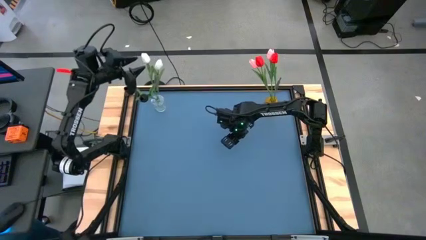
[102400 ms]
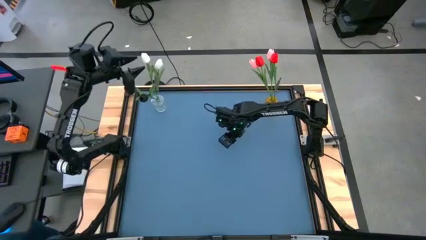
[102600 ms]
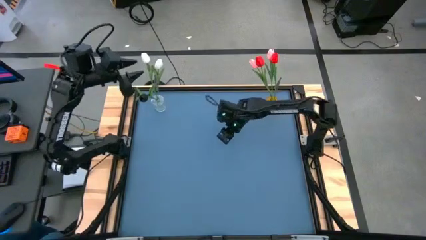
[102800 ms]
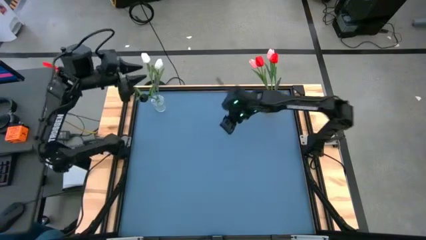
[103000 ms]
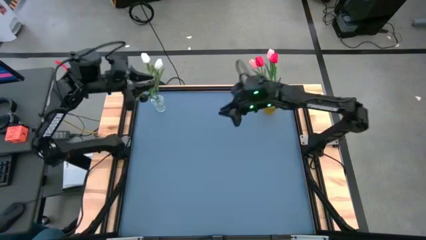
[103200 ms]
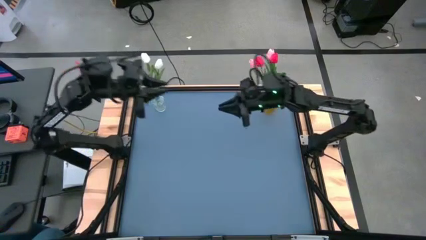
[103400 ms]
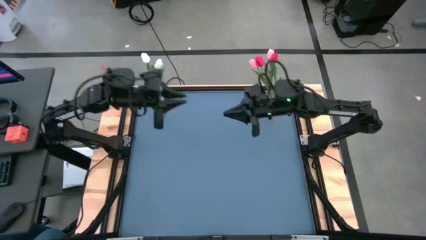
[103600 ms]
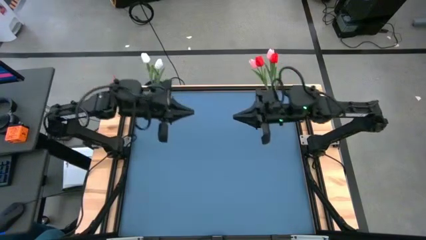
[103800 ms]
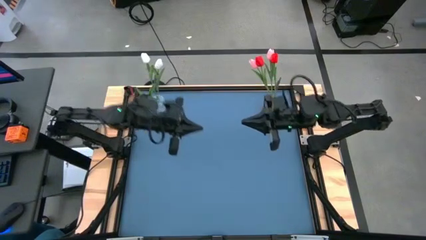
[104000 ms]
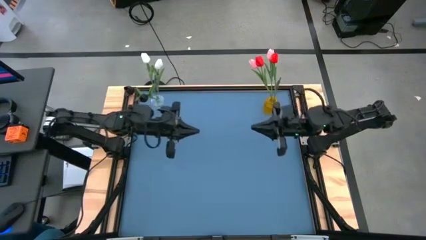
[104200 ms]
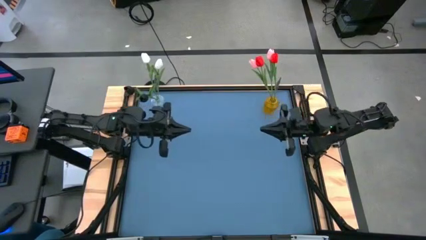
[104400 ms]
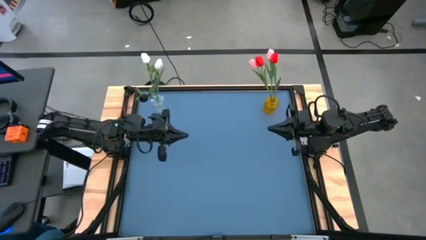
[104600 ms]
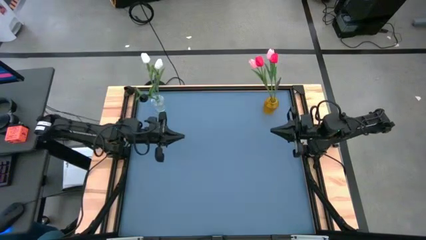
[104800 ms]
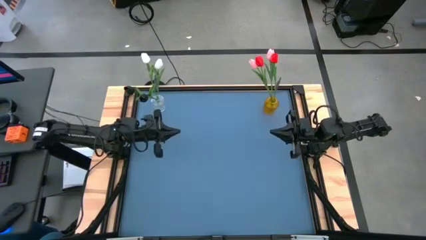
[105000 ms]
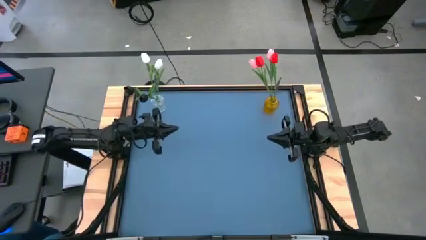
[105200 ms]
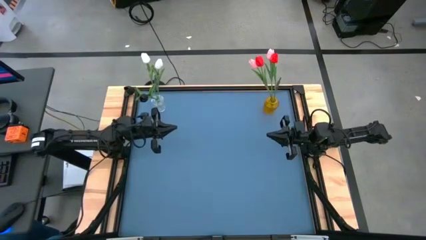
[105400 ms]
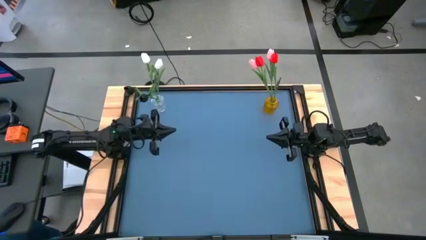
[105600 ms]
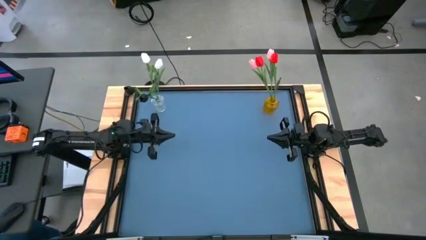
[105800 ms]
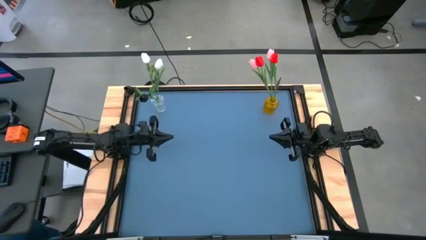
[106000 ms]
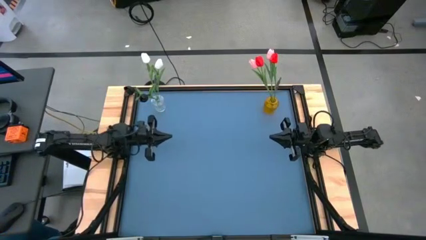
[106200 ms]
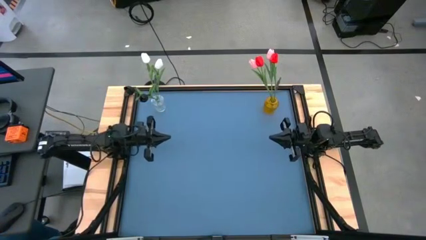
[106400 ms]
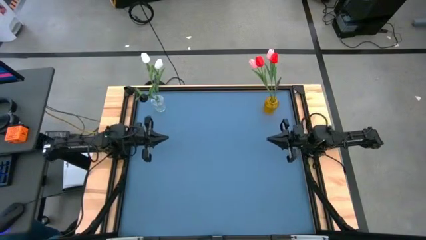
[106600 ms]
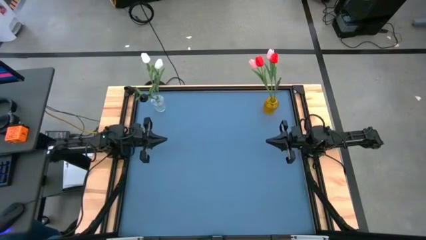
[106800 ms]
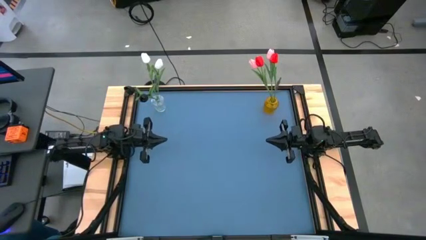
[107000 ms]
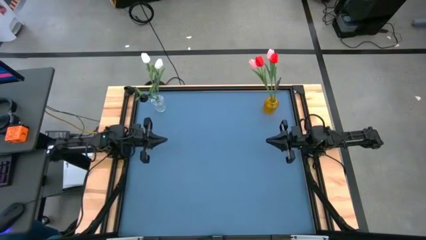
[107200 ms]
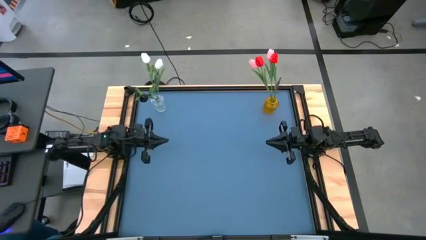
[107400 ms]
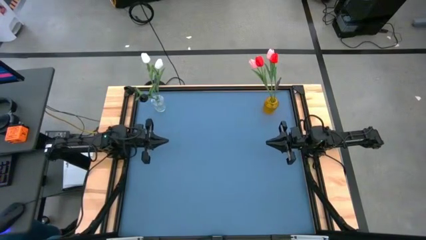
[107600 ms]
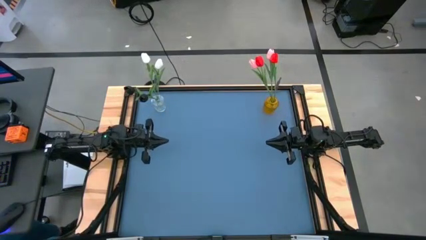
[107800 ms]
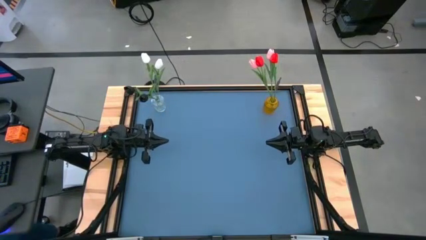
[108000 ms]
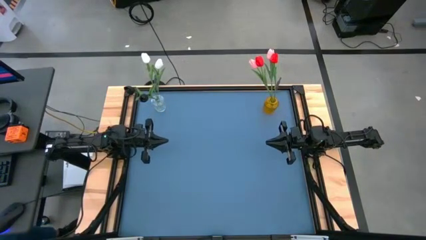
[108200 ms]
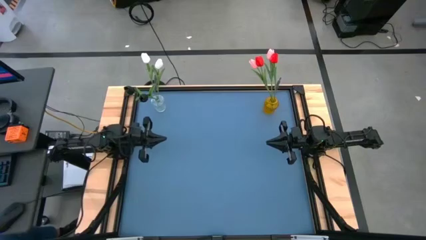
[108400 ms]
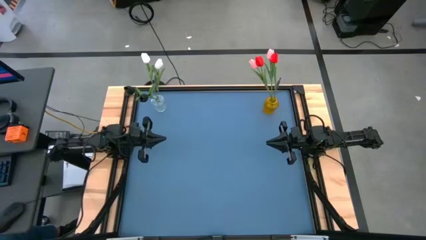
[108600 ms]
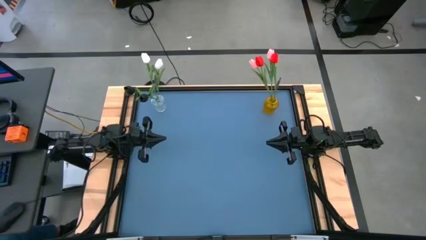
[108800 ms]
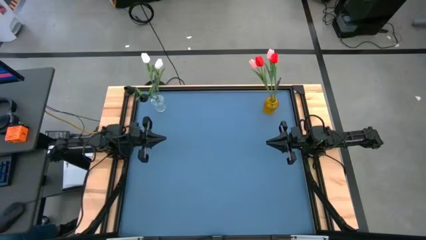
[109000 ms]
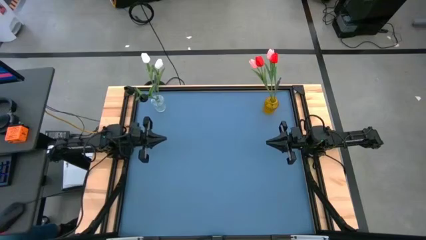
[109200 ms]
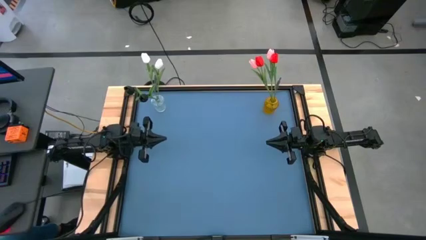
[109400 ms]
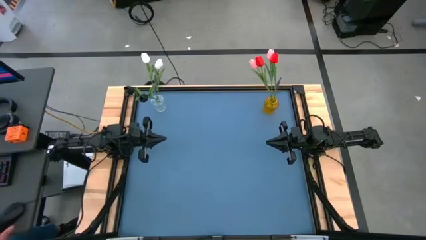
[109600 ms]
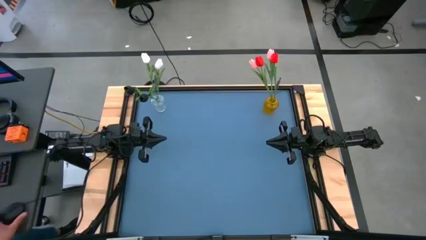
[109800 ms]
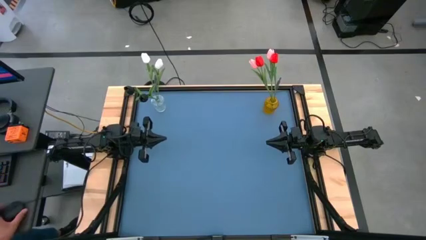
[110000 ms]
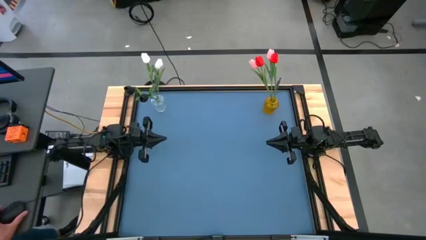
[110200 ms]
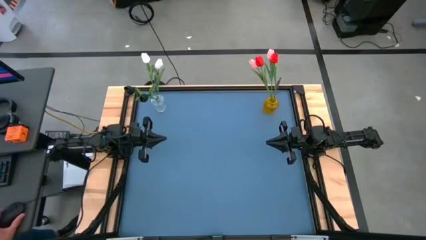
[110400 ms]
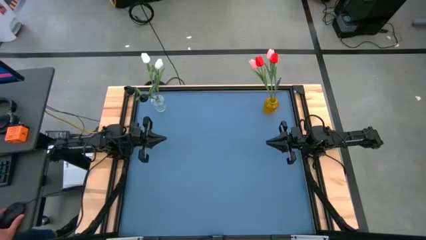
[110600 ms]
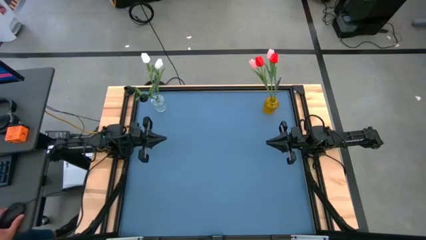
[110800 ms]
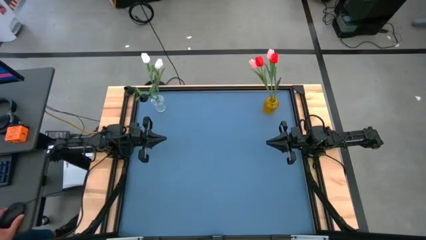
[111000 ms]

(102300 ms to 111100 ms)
Task: Sort flowers into vase by color
Return to Home Position

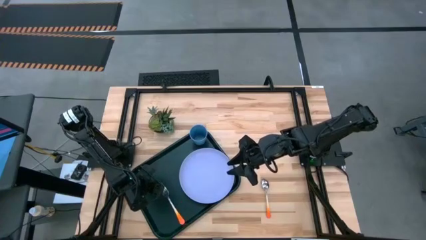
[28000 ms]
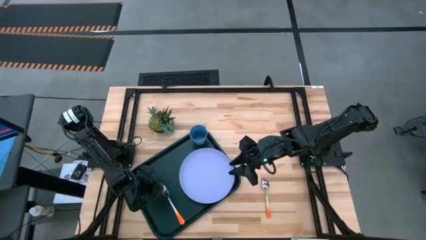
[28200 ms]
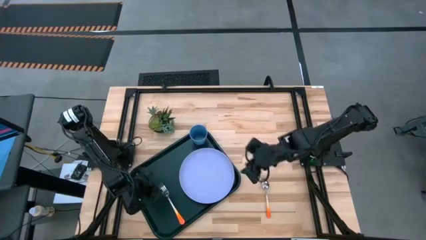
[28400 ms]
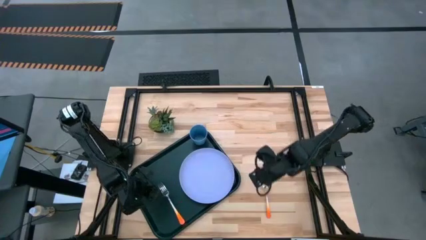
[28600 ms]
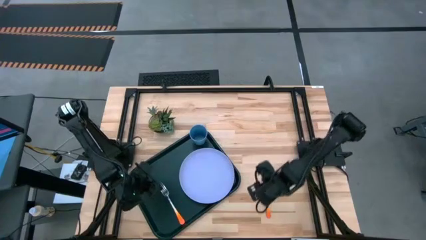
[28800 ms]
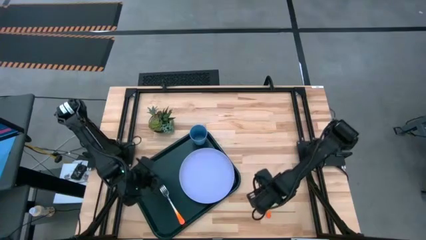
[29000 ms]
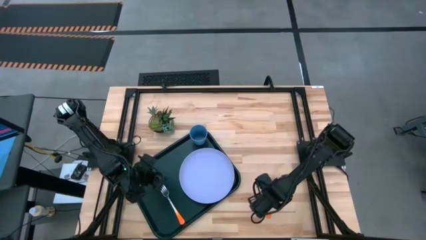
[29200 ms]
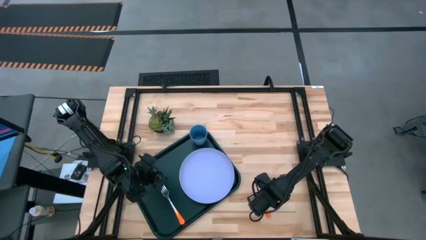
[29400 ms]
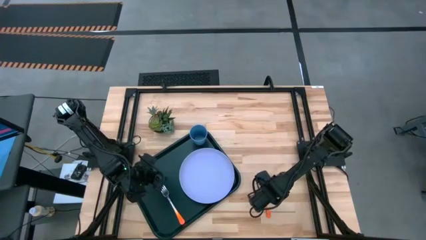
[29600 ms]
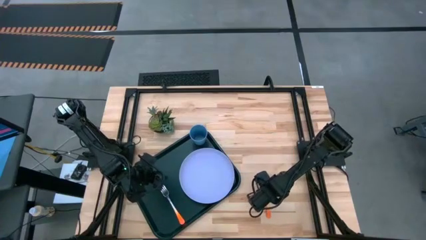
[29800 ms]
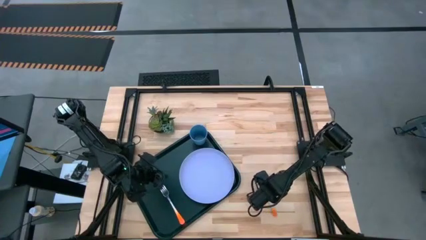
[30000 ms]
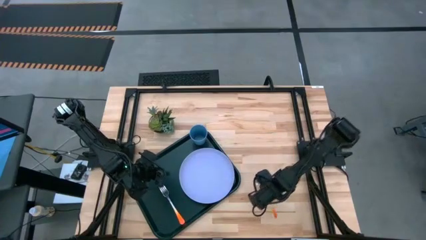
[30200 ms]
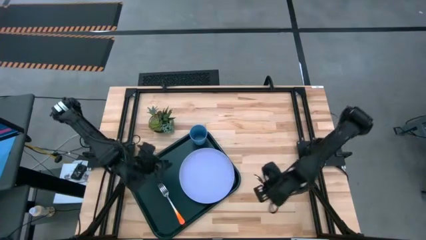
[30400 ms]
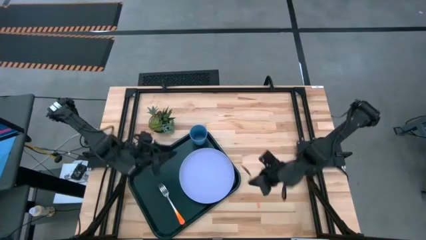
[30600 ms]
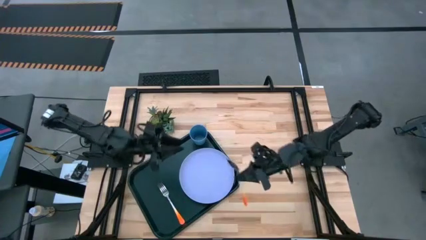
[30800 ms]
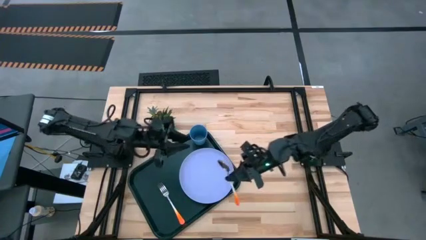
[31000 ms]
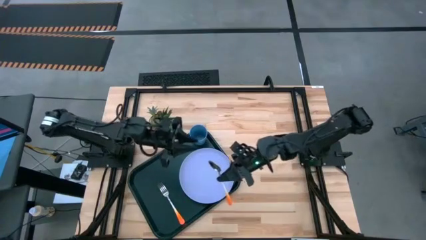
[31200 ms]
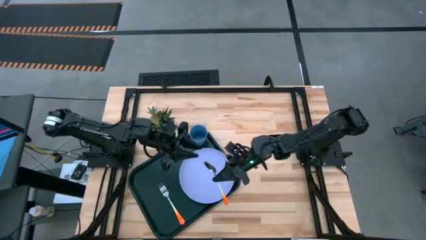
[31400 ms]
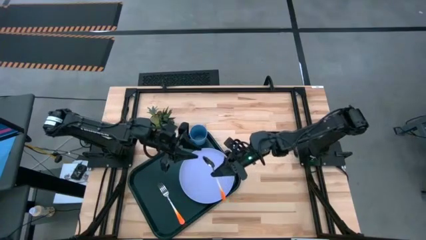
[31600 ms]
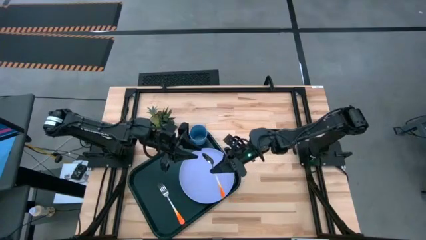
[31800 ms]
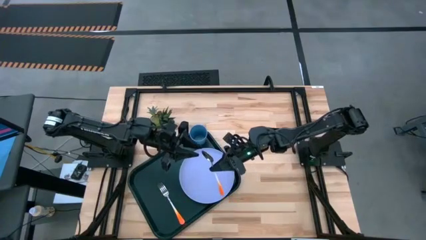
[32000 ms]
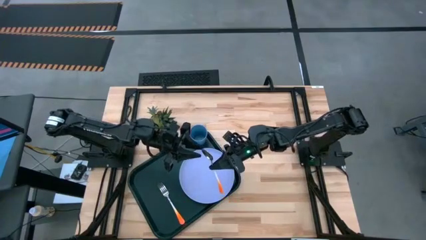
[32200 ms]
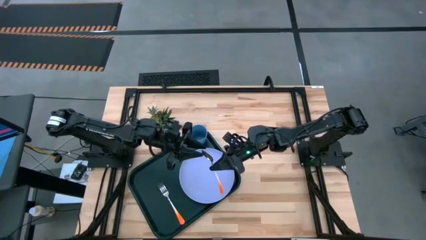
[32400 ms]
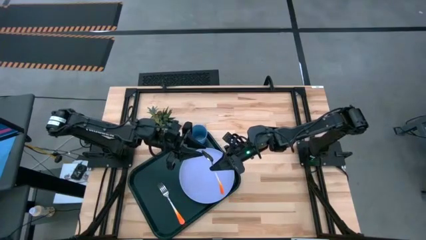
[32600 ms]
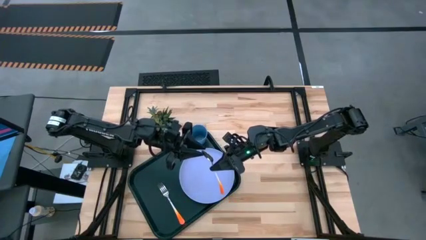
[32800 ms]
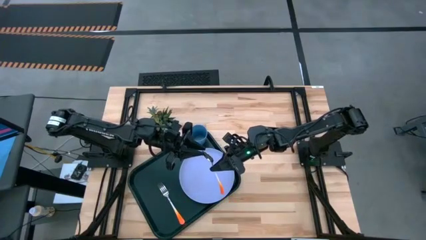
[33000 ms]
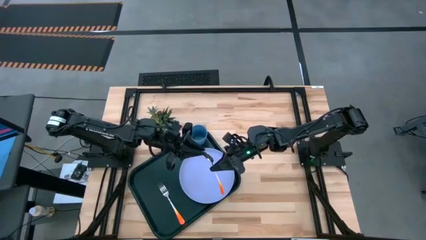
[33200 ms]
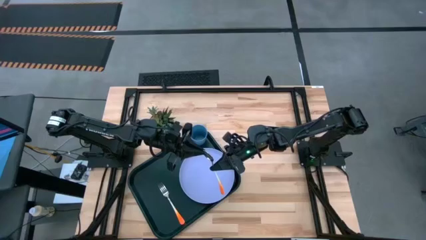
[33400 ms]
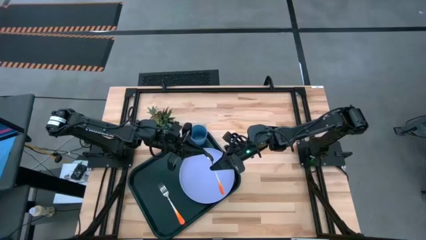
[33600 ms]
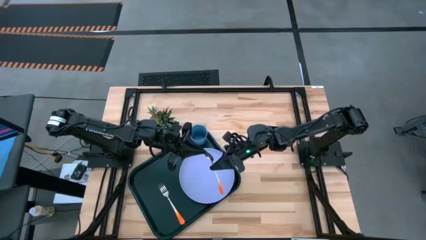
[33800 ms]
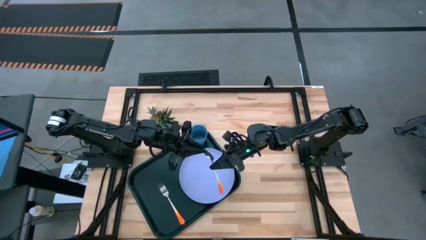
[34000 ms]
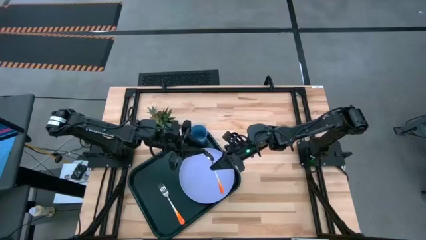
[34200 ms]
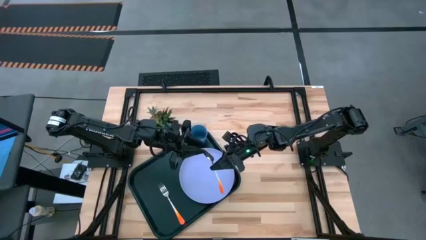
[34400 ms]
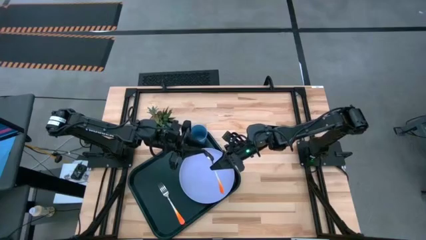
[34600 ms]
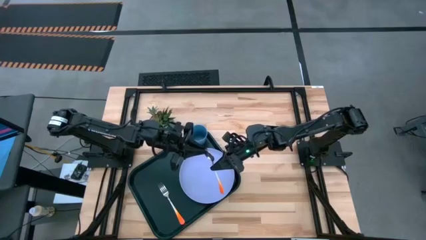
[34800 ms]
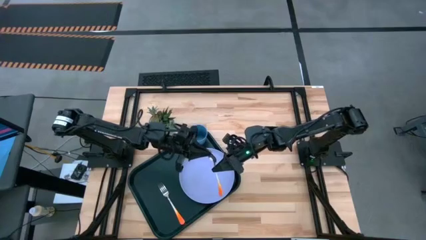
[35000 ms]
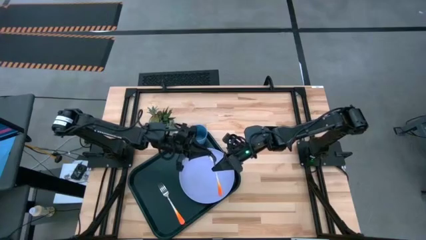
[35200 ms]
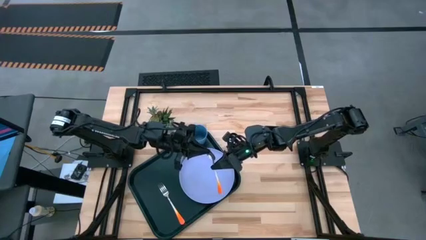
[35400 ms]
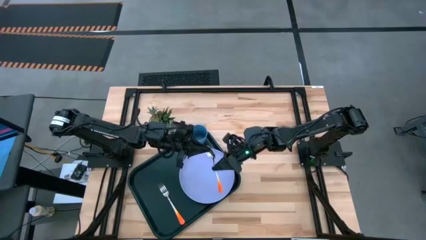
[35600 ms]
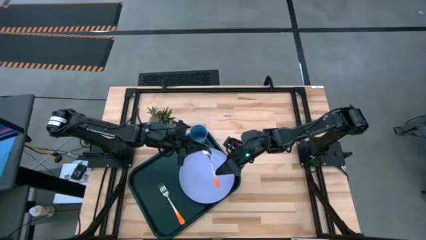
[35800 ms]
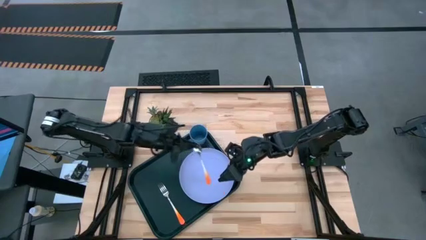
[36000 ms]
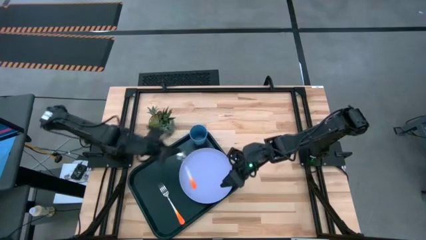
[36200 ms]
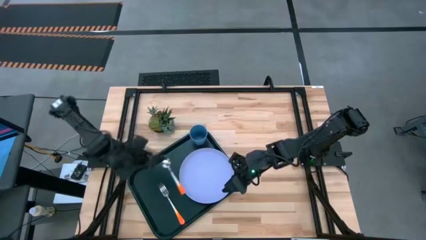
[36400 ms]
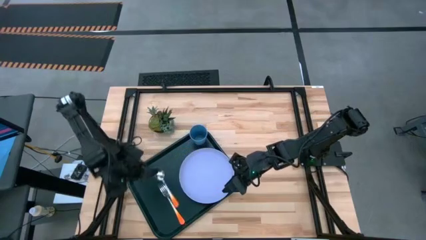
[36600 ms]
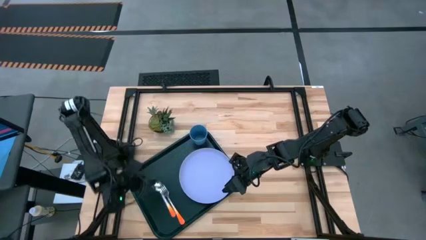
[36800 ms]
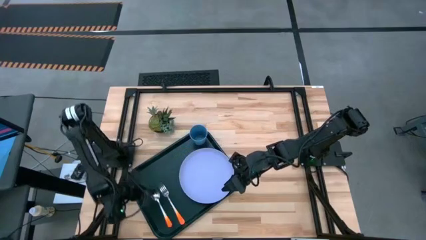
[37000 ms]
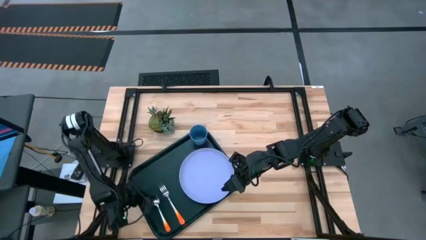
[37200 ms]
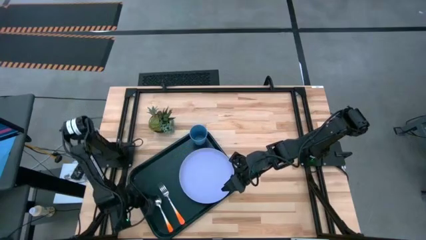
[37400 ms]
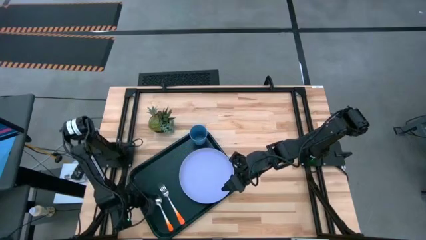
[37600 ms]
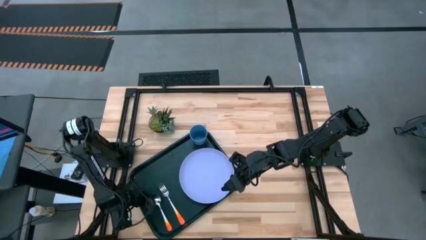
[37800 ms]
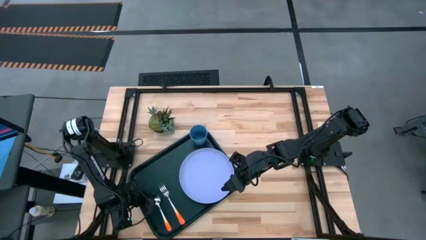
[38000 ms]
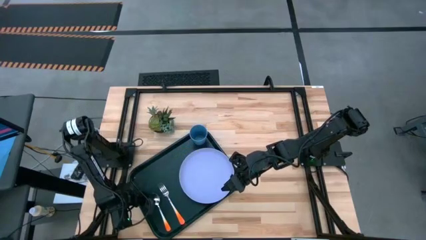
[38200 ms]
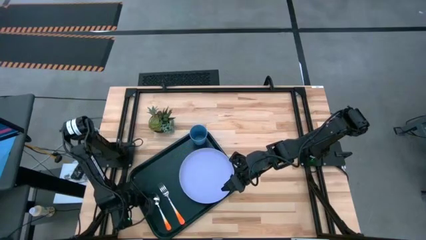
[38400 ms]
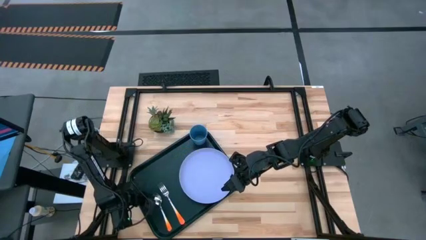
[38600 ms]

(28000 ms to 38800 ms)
Task: Pick and place plate/cup/fork/spoon on tray
Put the orange spoon on the black serving tray to the left of the orange fork
